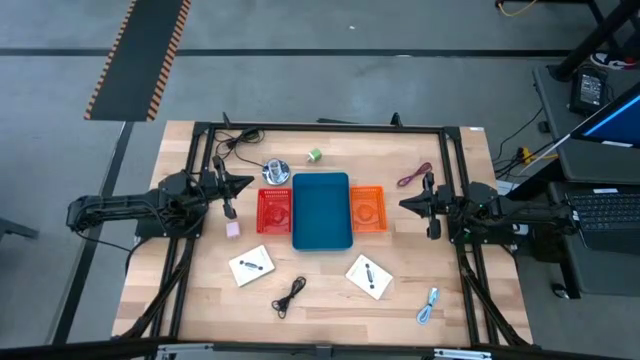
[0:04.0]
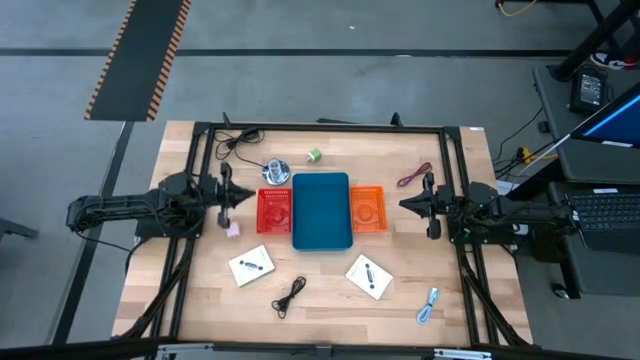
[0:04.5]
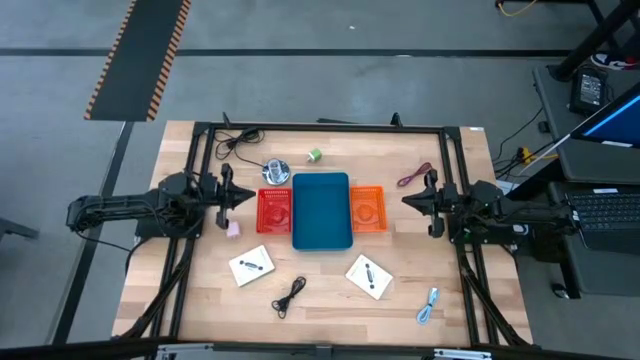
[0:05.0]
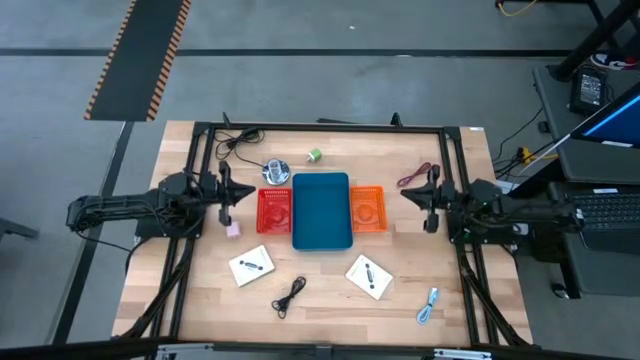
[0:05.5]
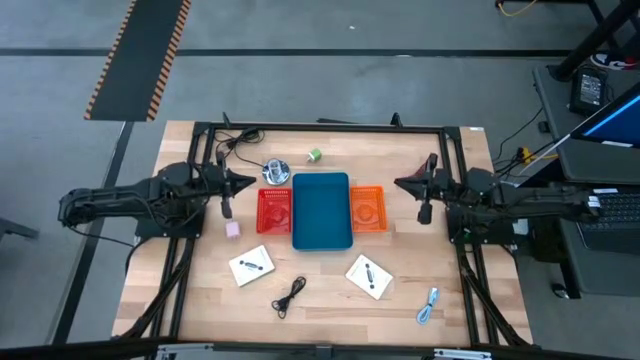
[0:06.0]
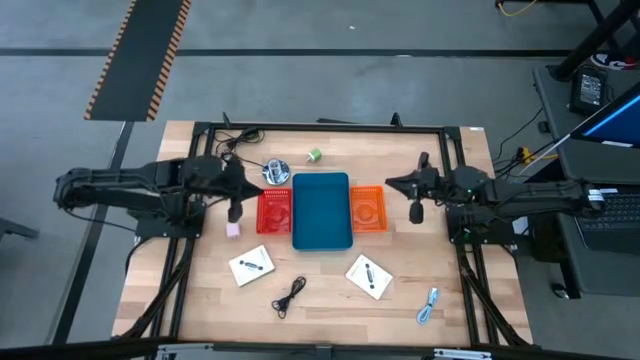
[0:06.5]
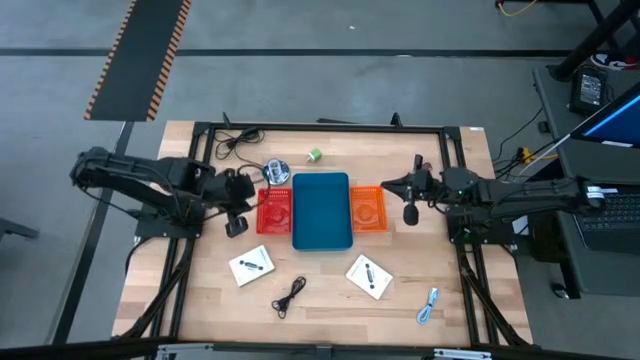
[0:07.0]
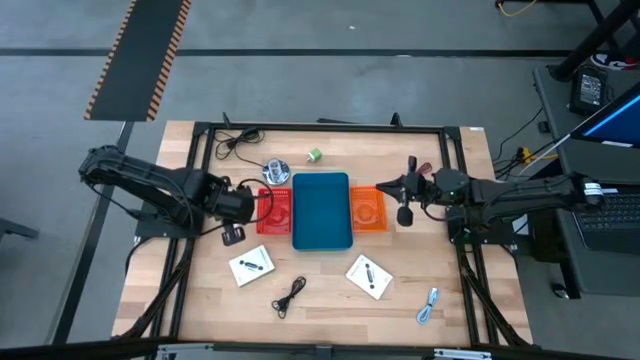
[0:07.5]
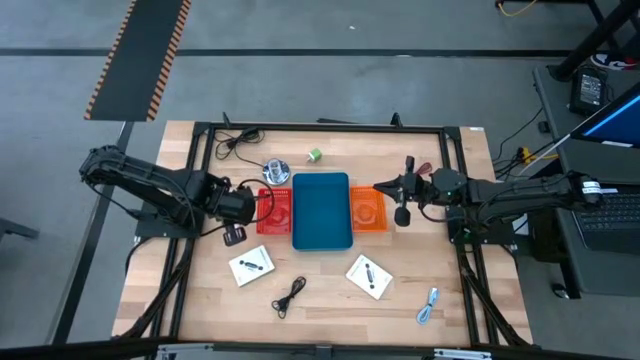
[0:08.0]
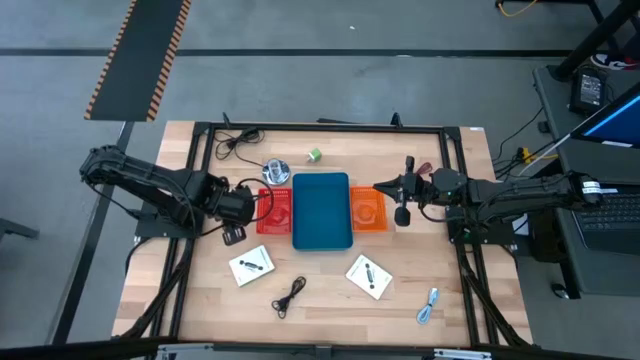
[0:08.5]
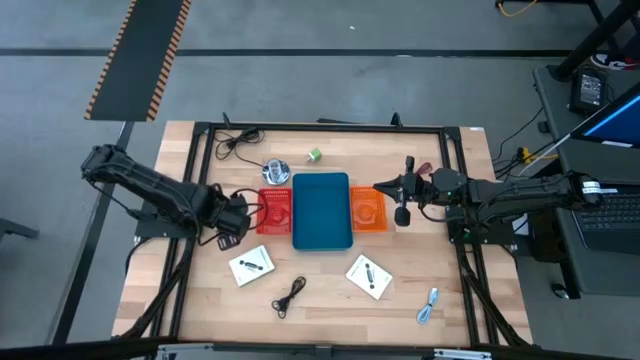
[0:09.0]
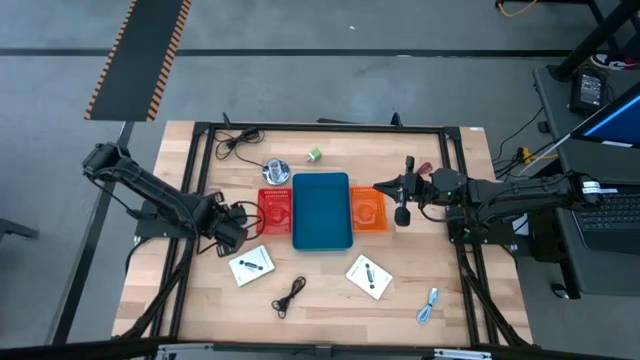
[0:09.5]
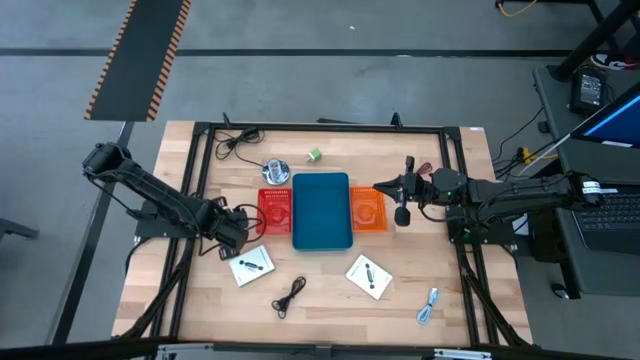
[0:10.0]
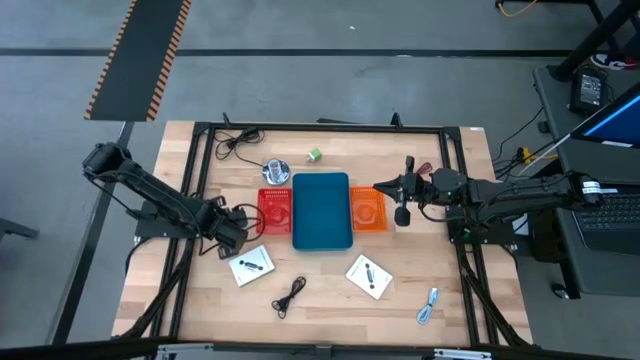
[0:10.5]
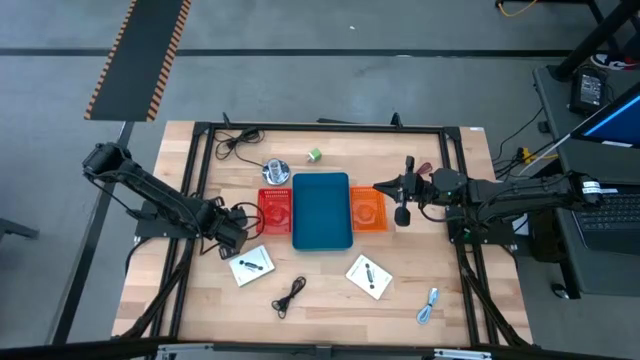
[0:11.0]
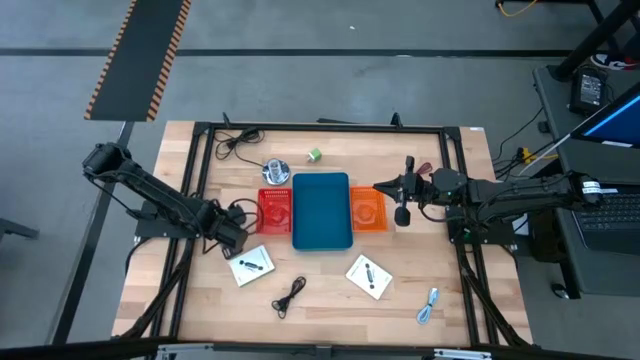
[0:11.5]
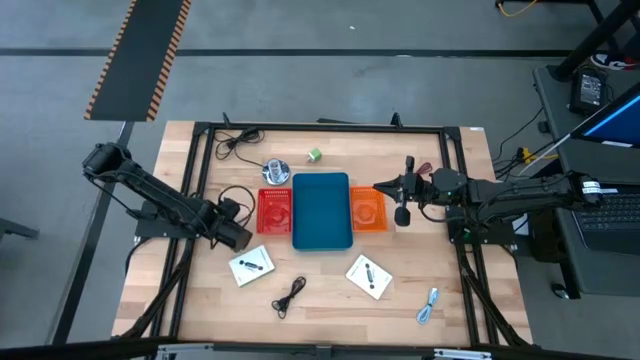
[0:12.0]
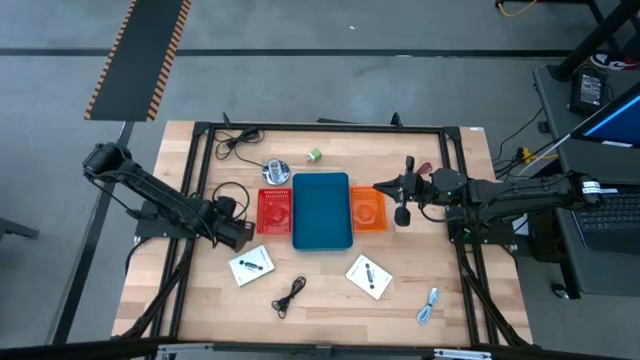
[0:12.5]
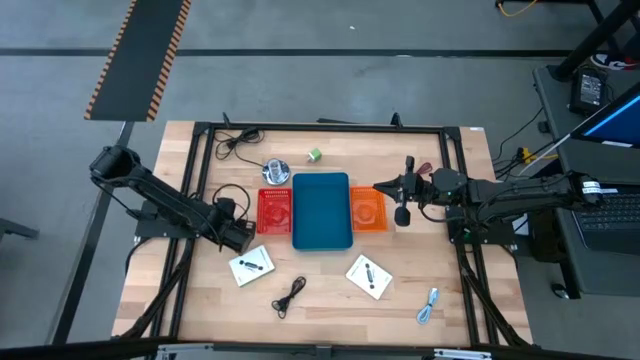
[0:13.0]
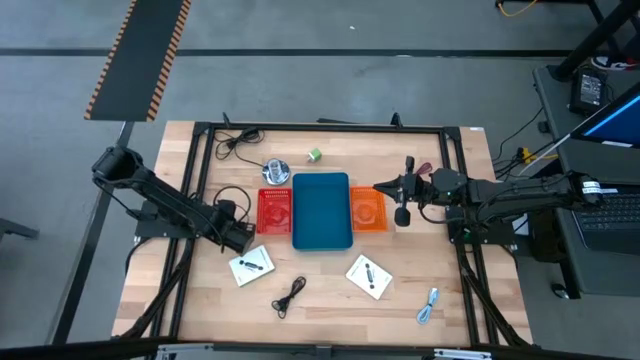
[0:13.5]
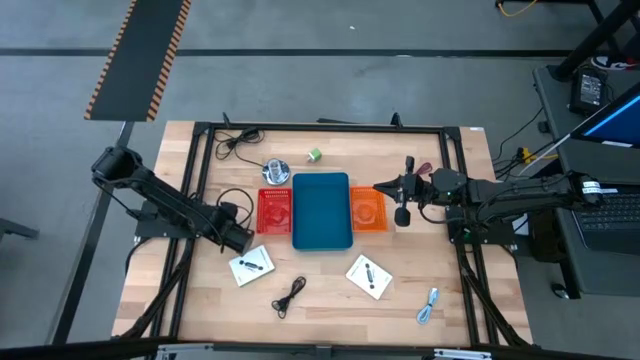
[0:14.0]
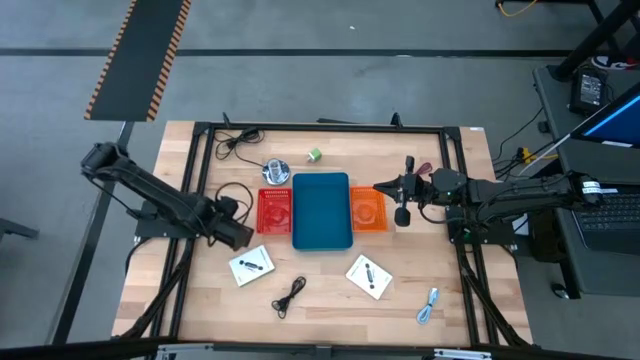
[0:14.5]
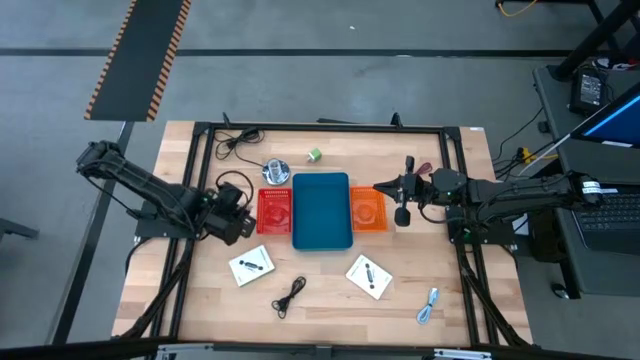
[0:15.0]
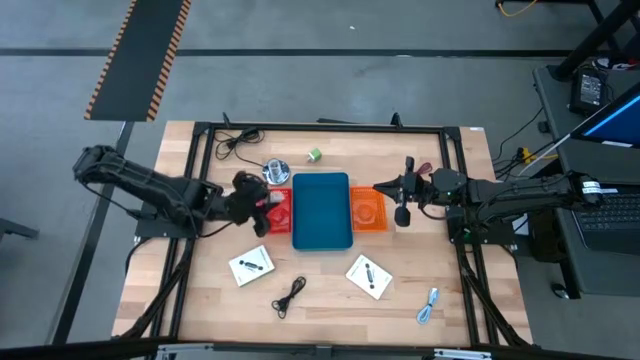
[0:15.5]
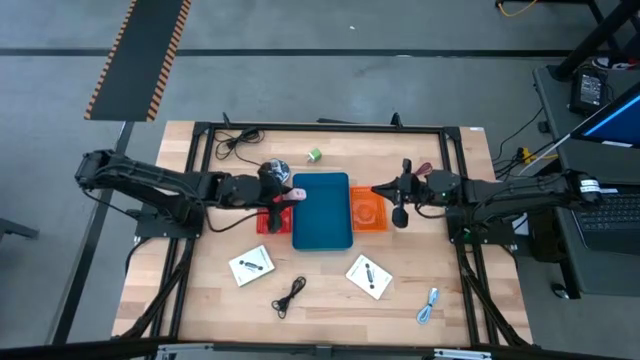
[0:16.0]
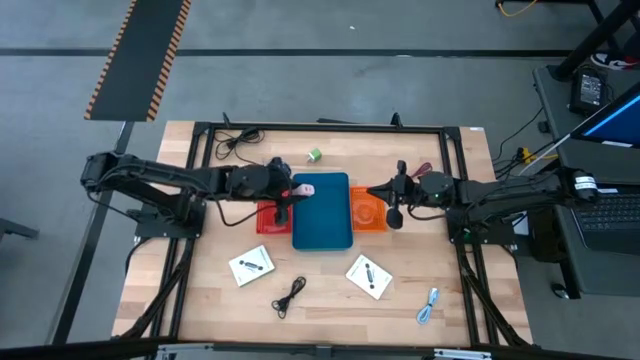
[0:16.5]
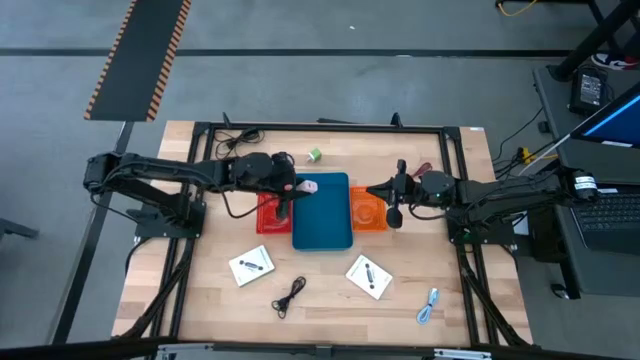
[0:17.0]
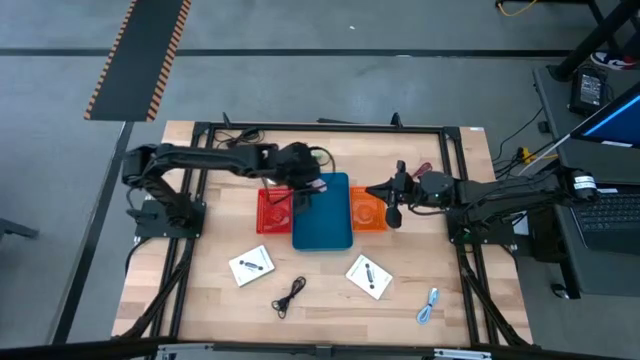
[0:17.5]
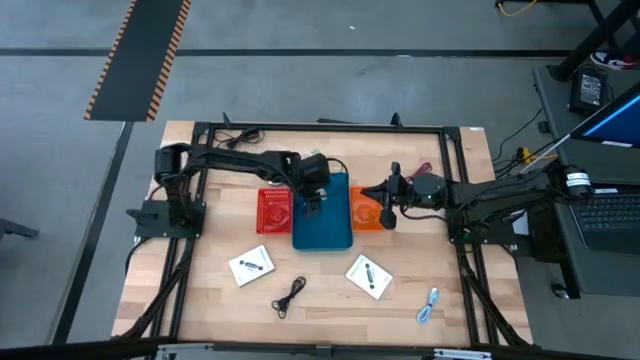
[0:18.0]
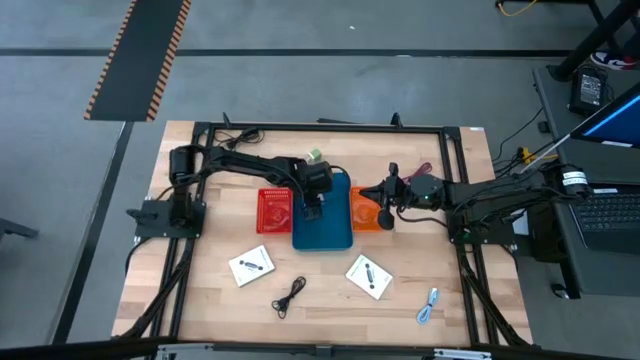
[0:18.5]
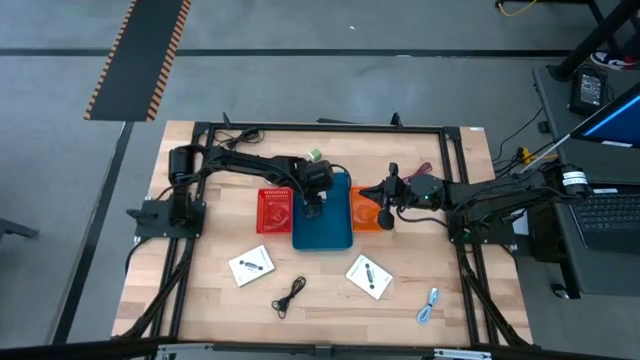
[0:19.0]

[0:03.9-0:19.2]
Task: Pick and place items into bin
Put the white charger adapter into the blue bin

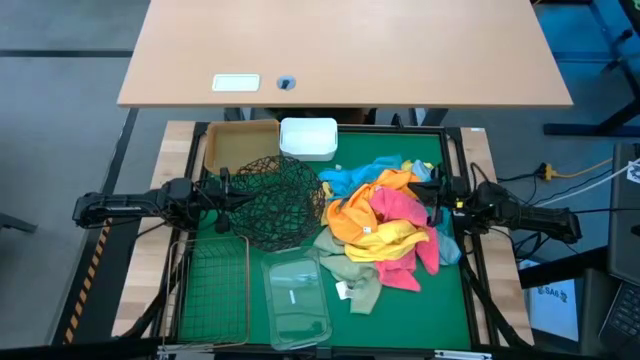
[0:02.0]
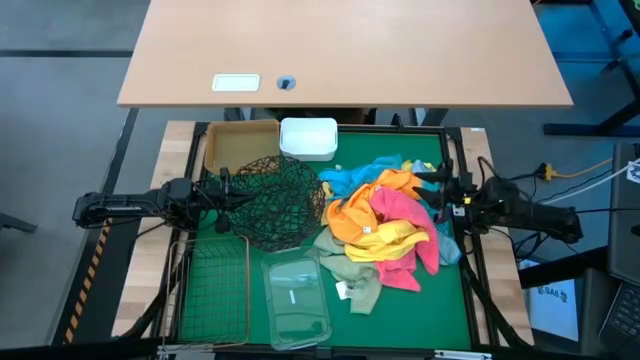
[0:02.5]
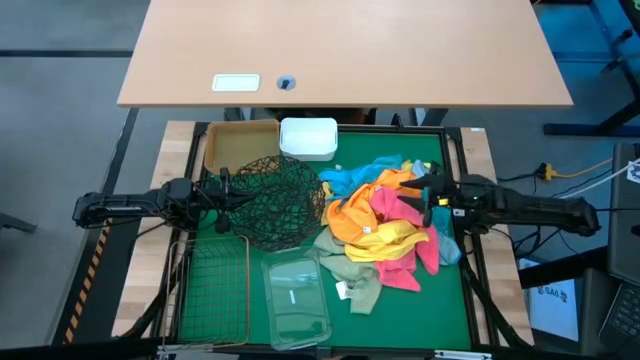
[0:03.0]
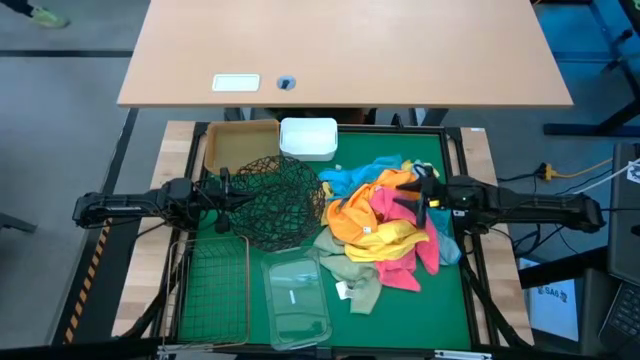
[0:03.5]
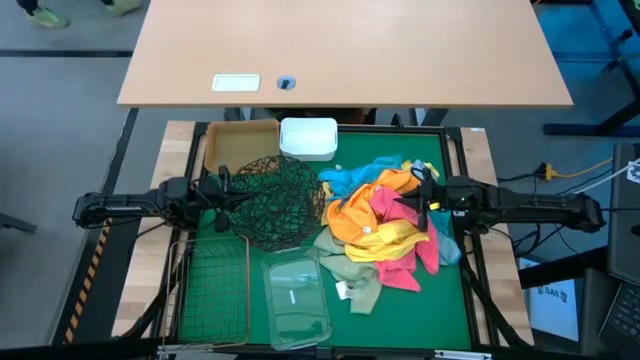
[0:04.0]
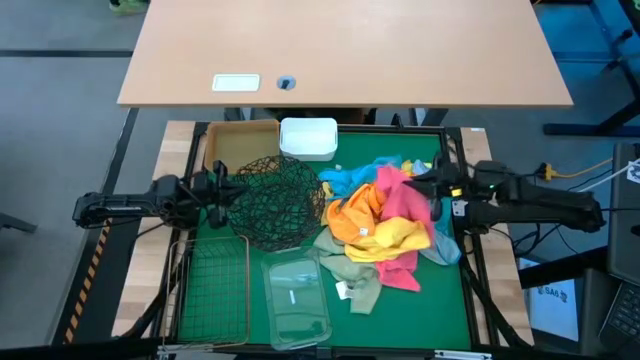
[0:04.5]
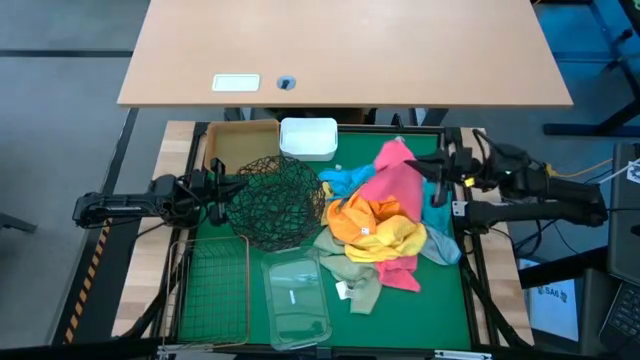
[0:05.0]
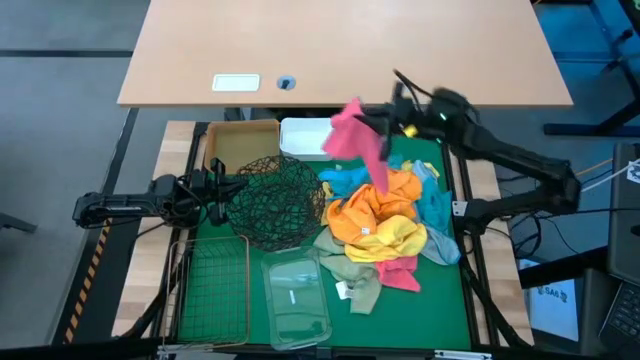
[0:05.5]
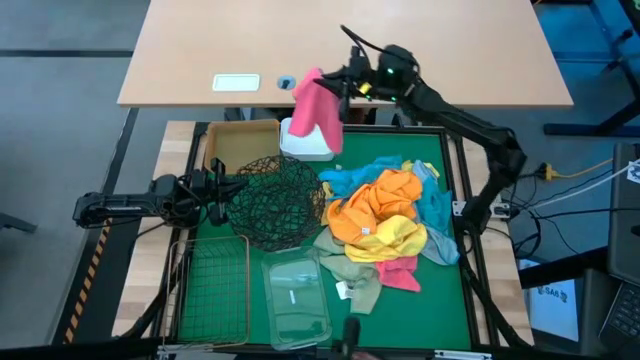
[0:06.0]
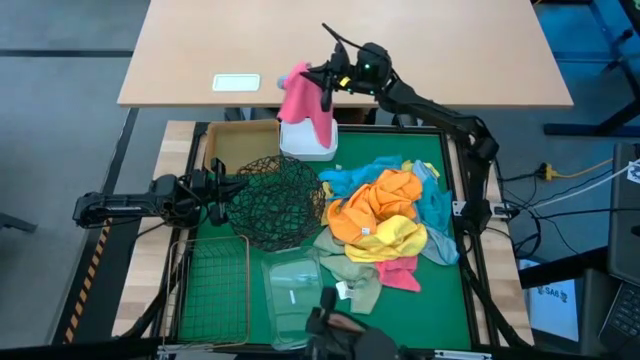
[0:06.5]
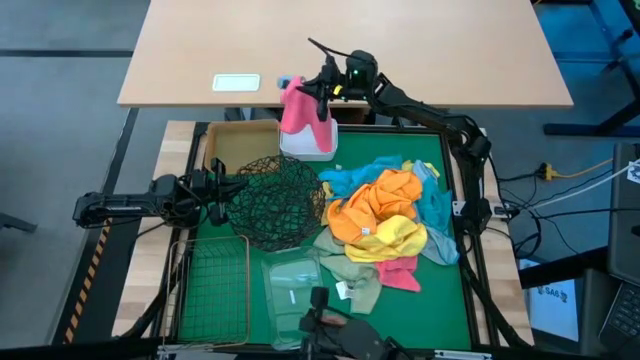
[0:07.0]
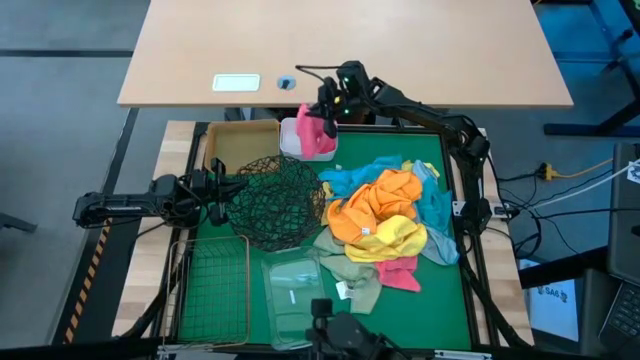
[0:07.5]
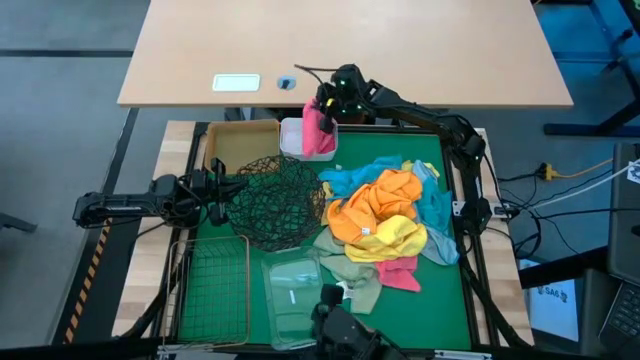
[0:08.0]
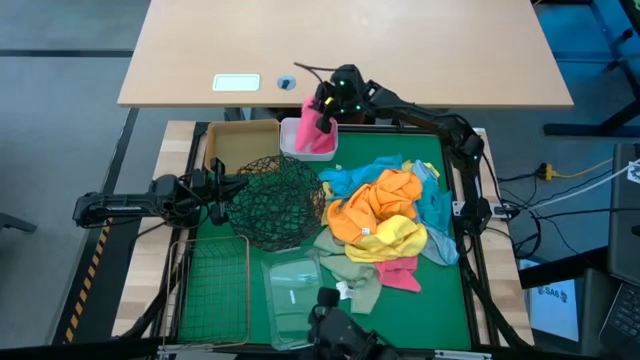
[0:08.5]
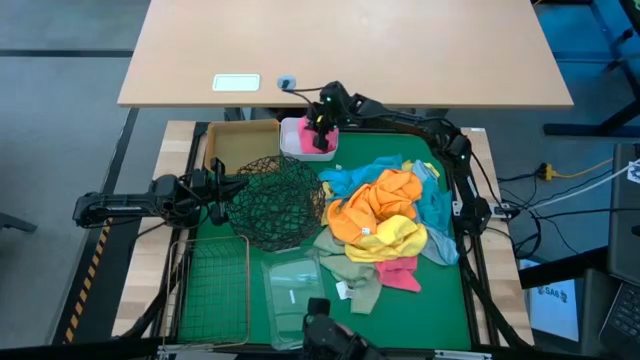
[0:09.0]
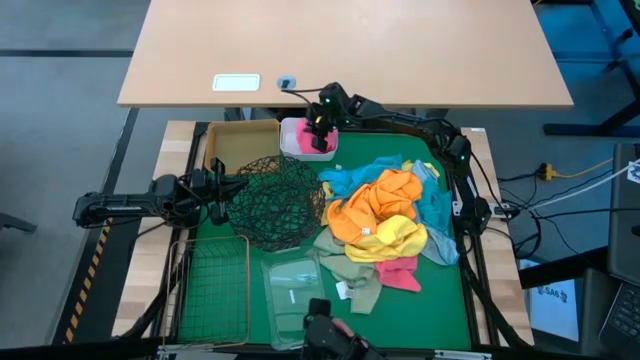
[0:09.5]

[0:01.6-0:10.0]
Task: Sort microfiber towel by color & place in baskets
Put the pink microfiber towel into the white bin
